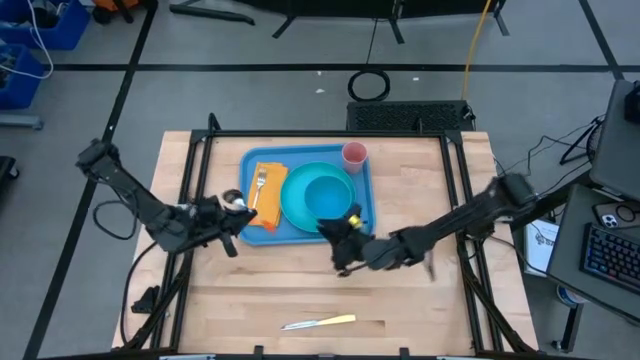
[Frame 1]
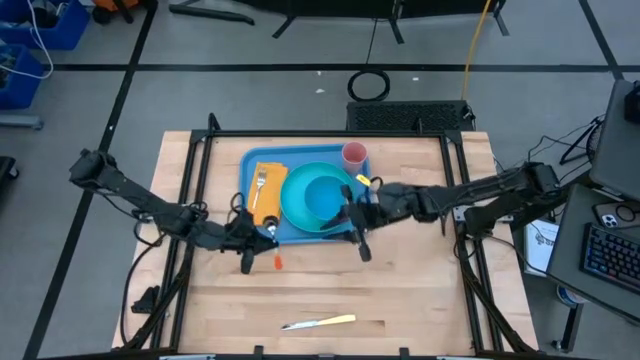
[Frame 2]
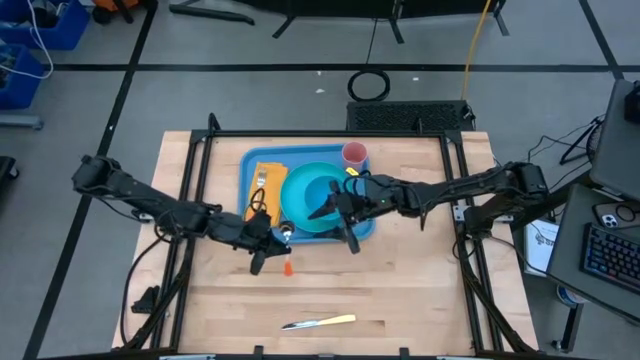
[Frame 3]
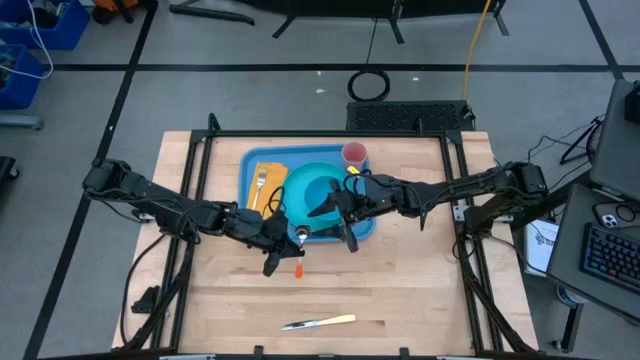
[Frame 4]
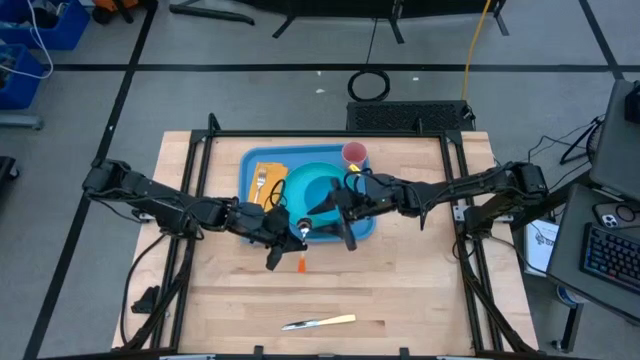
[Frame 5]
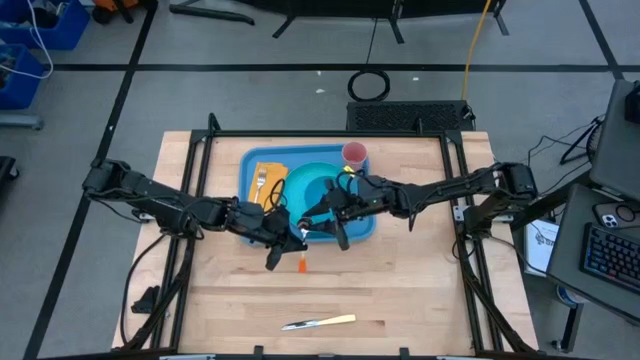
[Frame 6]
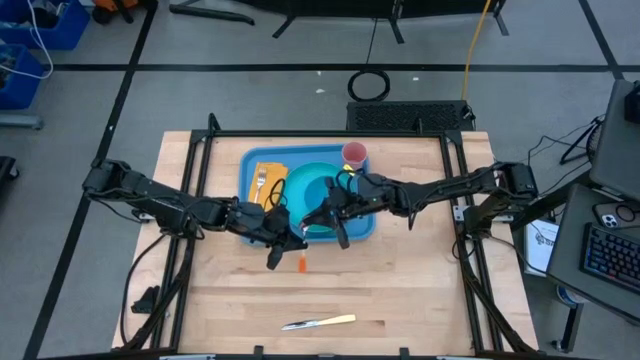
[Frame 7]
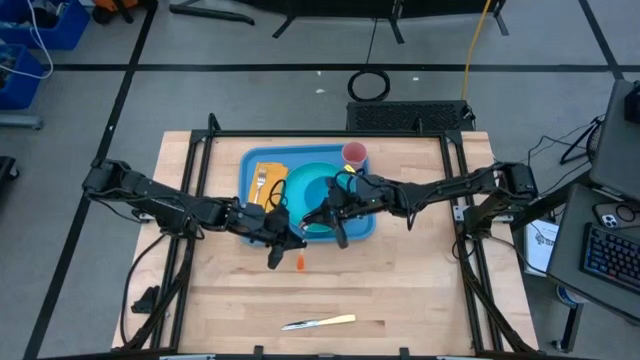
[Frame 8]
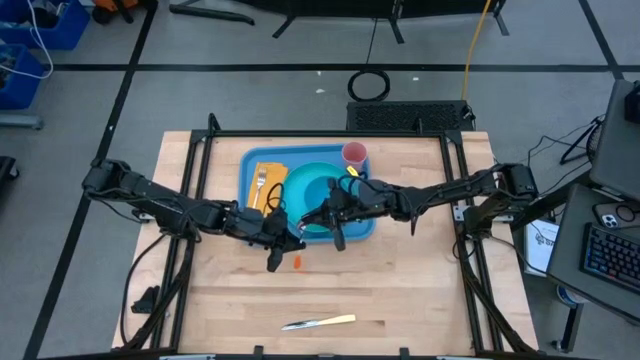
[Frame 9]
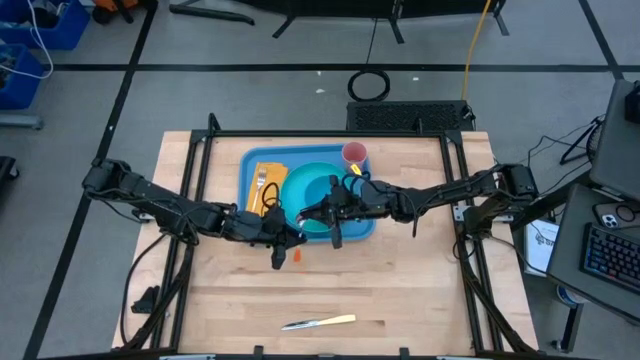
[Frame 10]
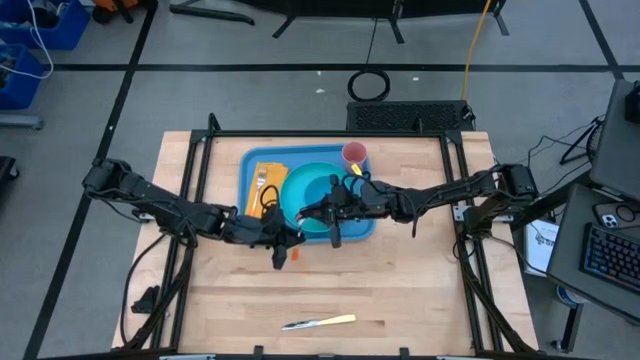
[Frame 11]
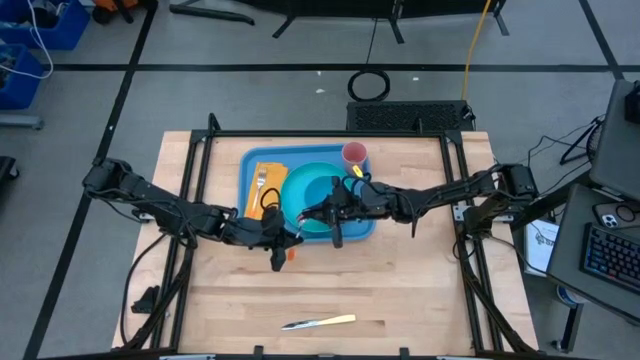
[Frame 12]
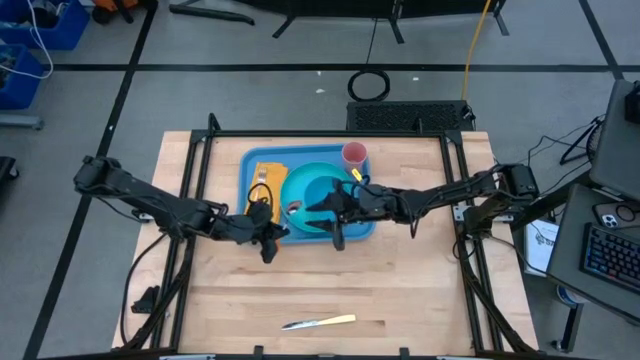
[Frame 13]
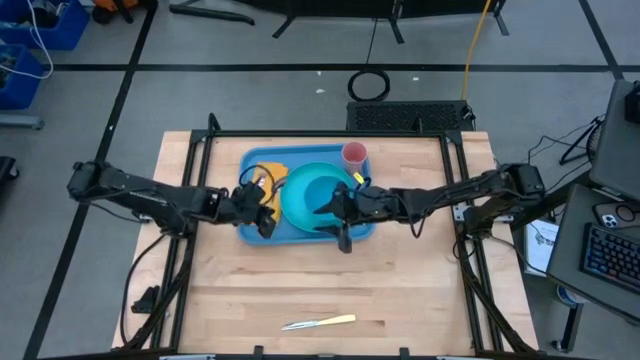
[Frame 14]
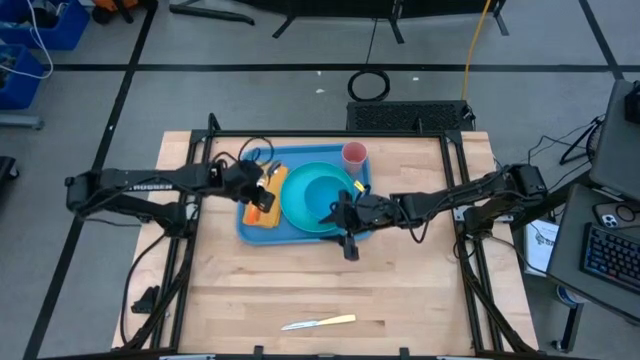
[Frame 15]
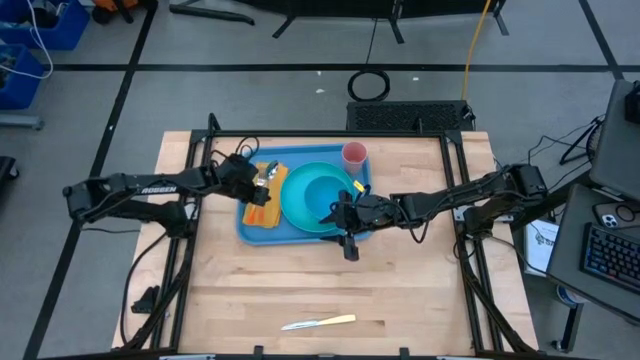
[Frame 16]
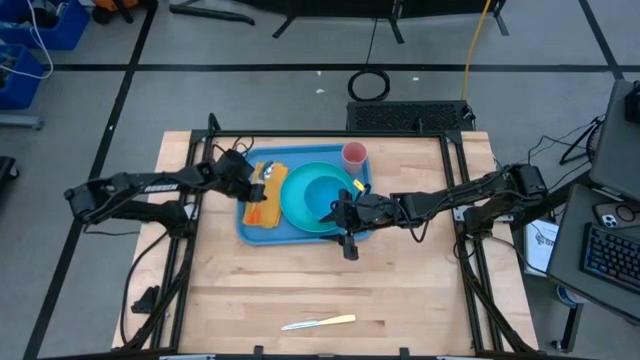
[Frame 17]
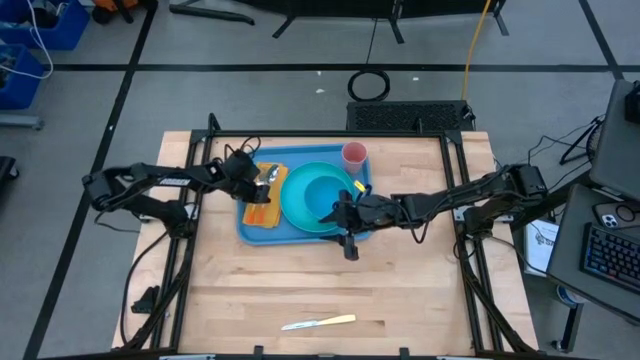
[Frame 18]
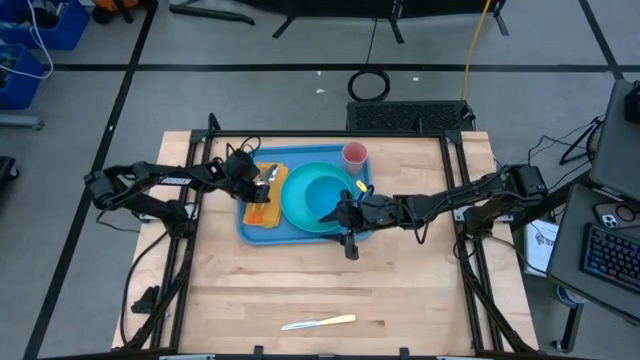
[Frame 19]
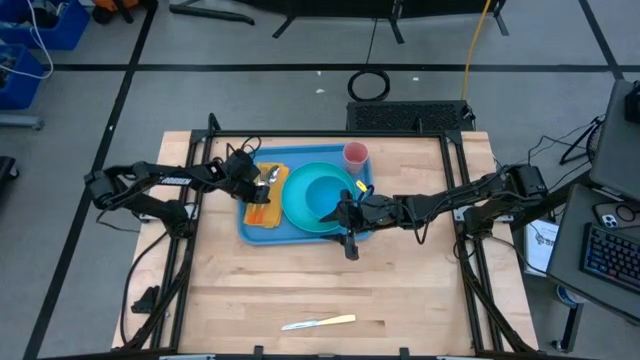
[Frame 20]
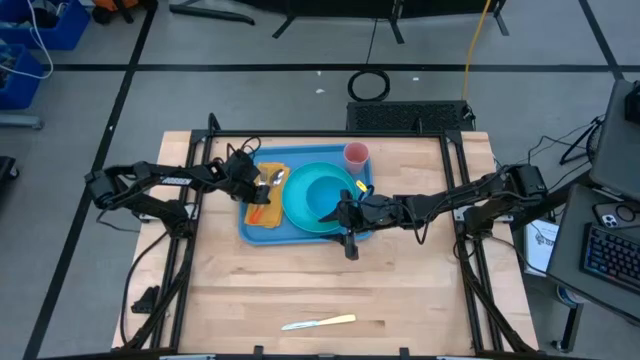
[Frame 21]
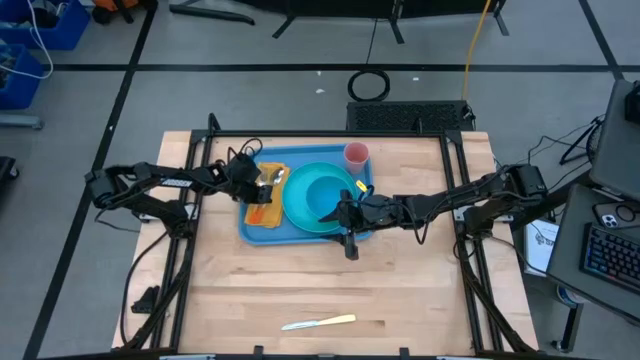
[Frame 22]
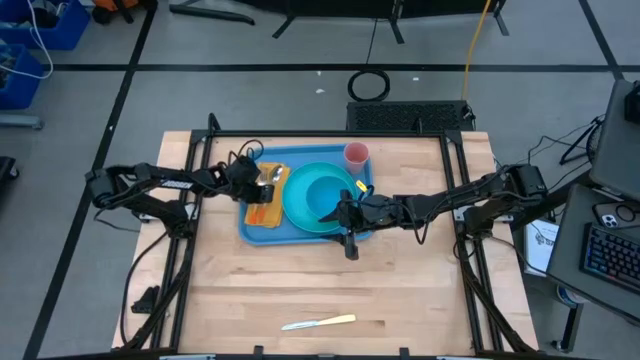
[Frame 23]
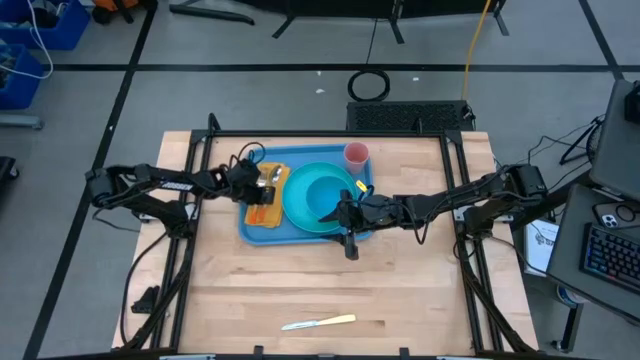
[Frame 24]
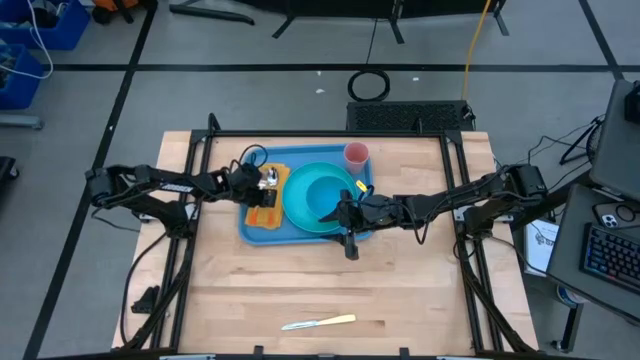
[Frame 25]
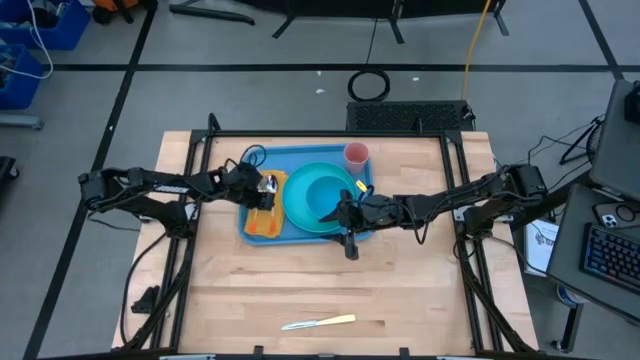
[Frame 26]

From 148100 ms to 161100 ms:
Task: Set up tray
Put the orange spoon on the yellow napkin to the right of the orange fork on the blue serving tray

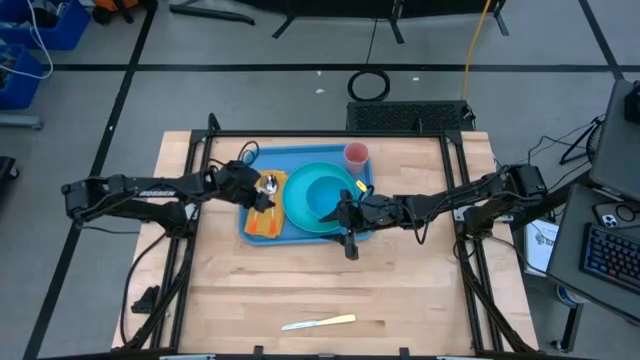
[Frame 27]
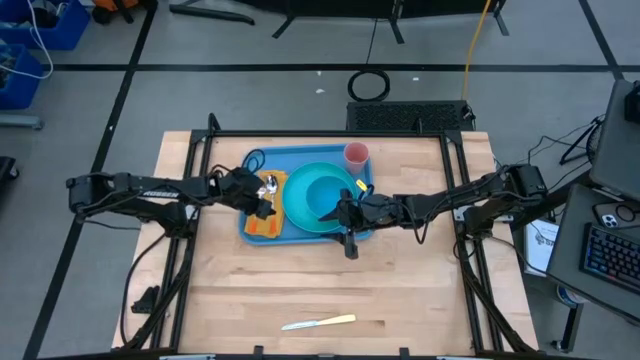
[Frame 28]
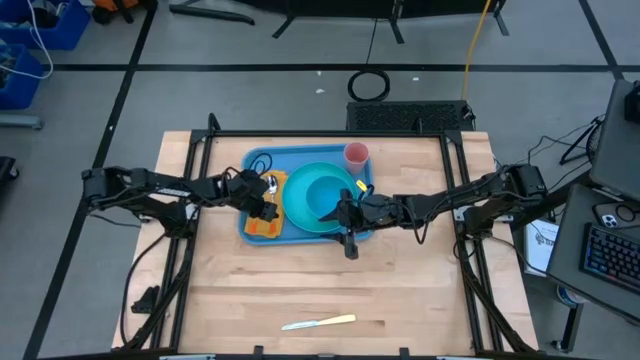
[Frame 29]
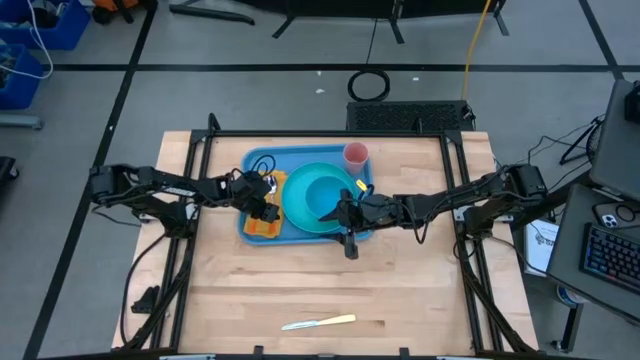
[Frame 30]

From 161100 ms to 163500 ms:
Adjust the orange napkin

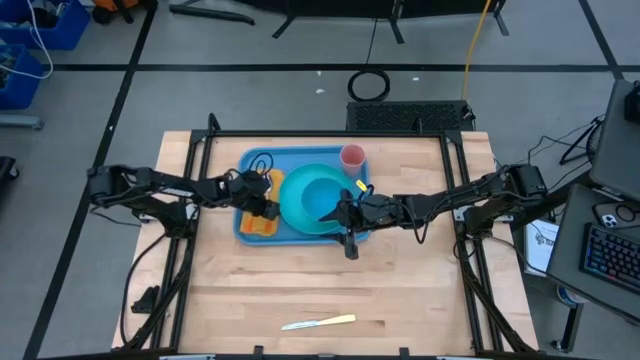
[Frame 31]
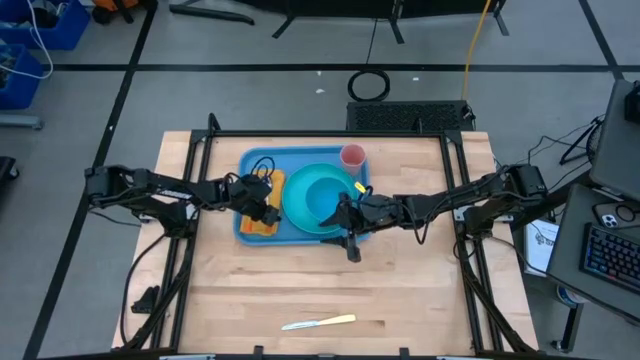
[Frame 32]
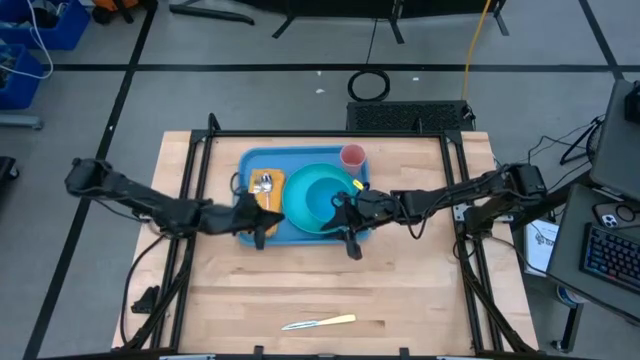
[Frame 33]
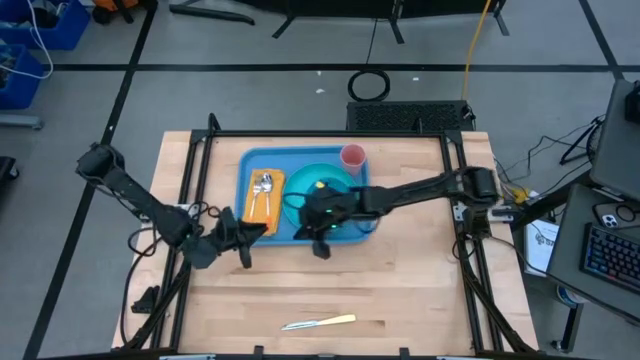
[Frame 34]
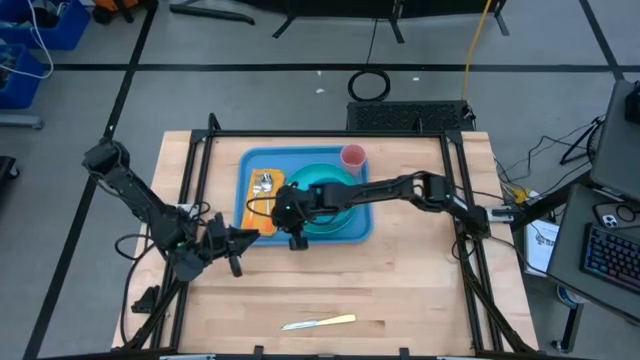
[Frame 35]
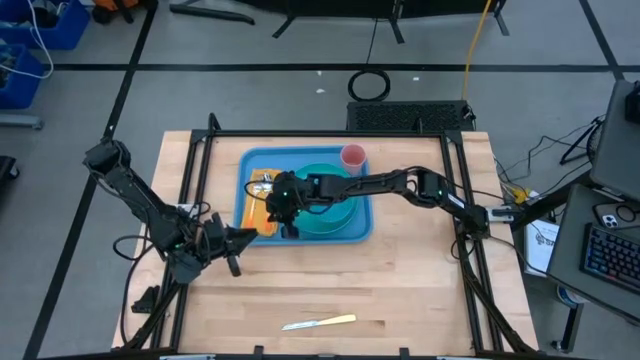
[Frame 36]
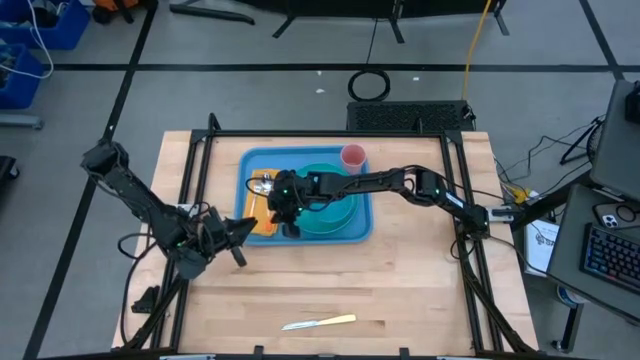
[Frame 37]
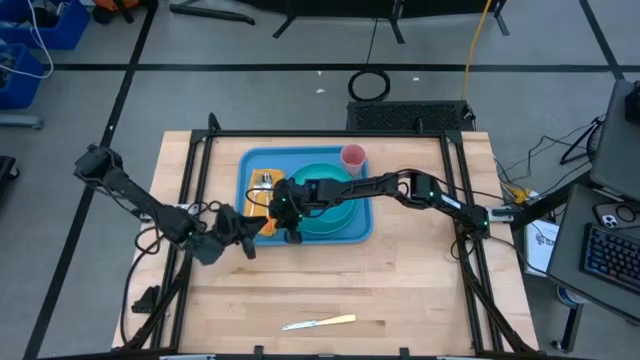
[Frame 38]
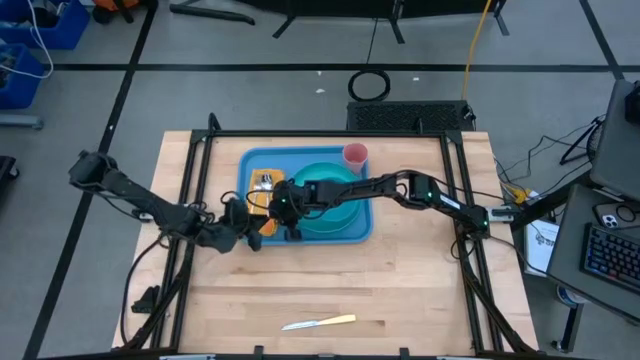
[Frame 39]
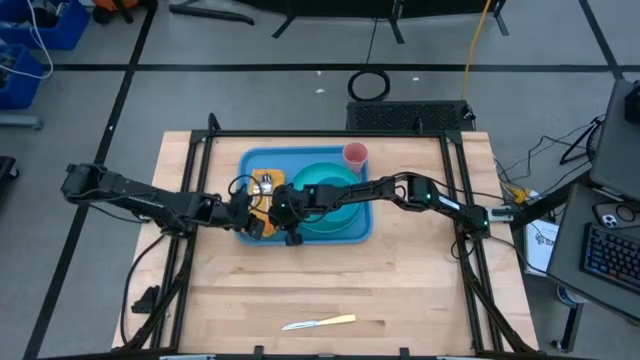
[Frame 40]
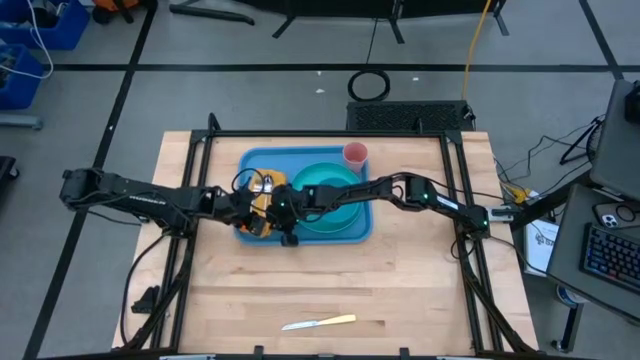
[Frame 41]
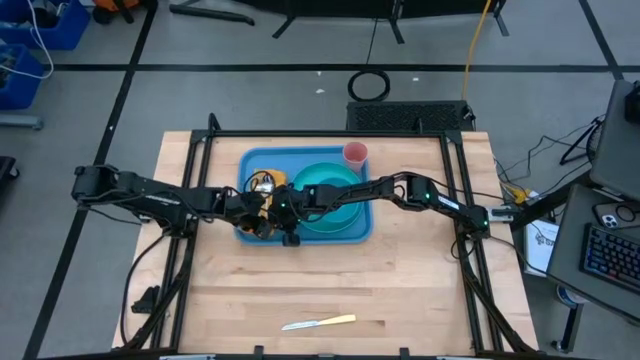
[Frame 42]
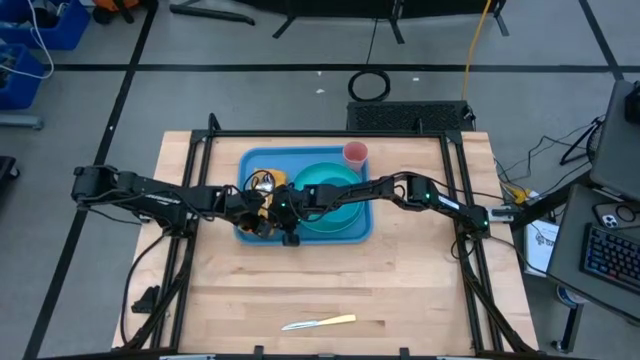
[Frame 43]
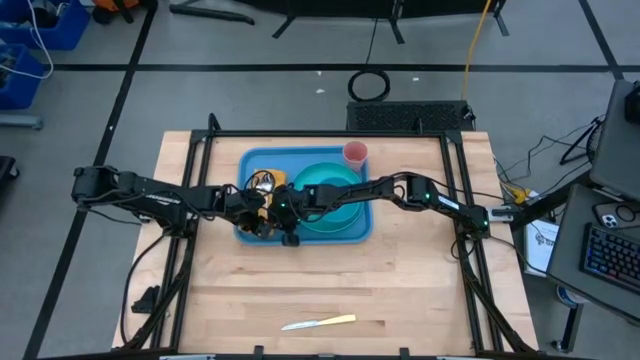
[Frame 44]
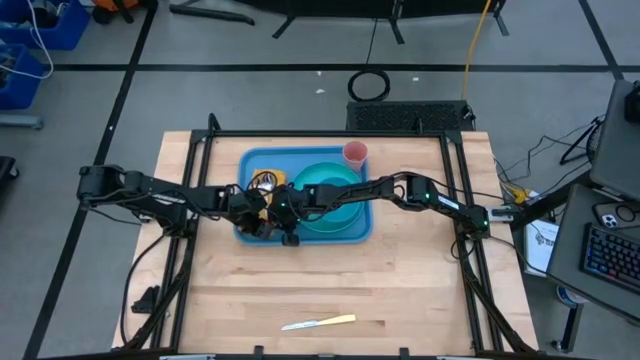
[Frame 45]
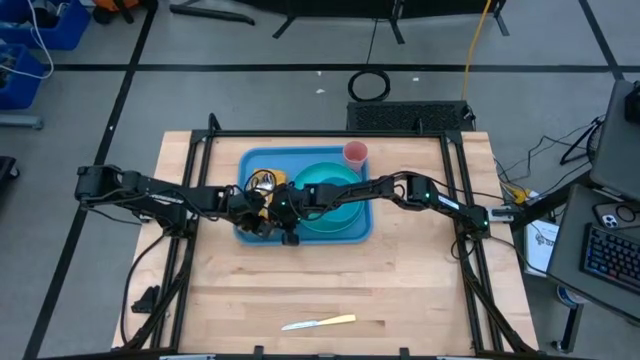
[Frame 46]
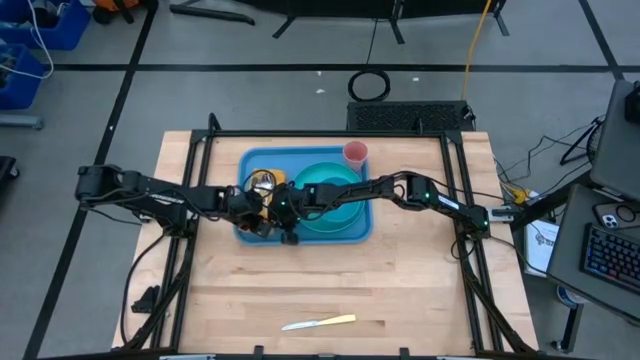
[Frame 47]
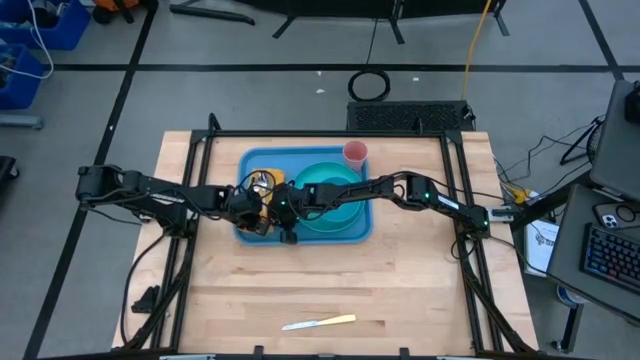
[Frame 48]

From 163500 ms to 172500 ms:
Adjust the orange spoon on the orange napkin on the blue serving tray
